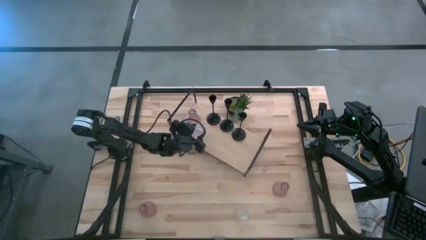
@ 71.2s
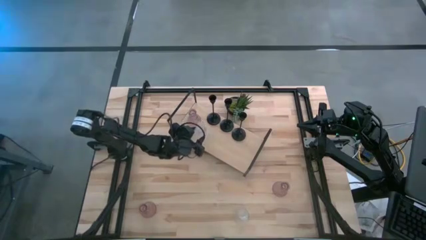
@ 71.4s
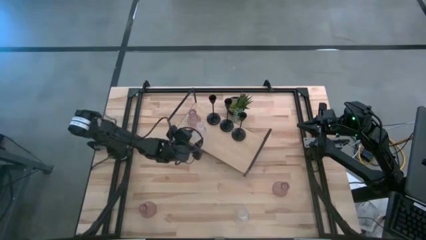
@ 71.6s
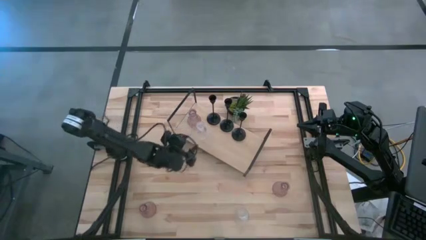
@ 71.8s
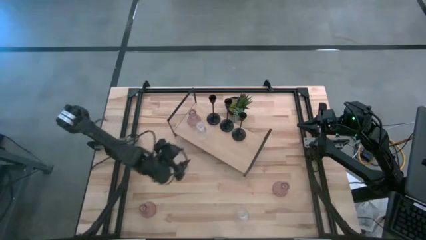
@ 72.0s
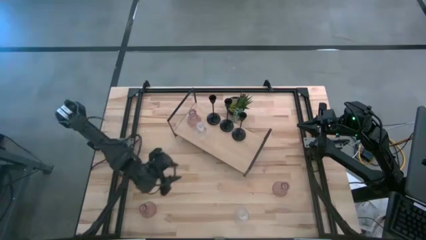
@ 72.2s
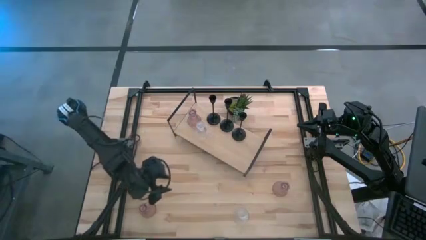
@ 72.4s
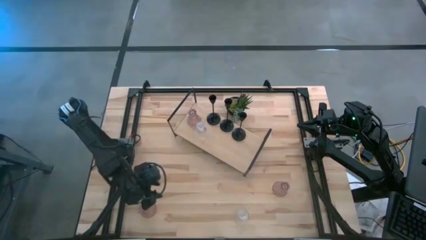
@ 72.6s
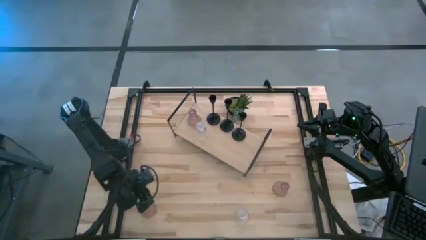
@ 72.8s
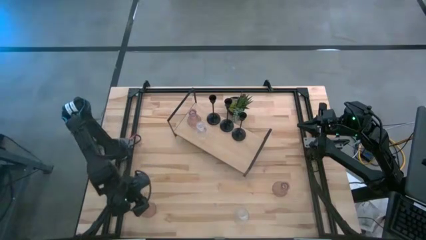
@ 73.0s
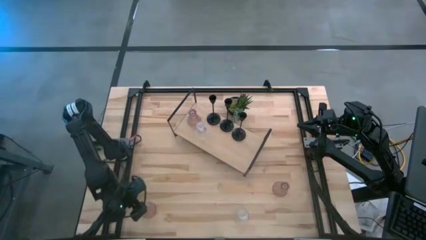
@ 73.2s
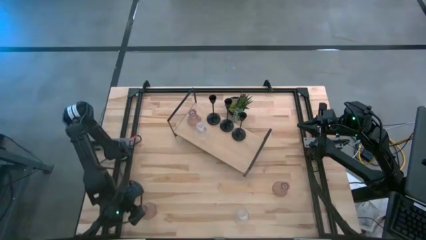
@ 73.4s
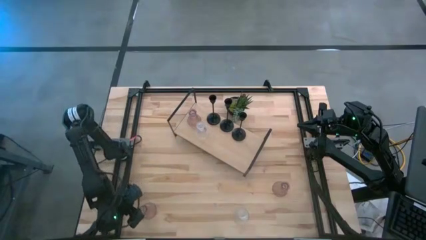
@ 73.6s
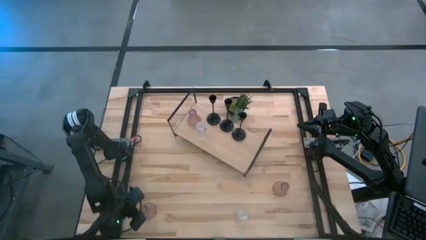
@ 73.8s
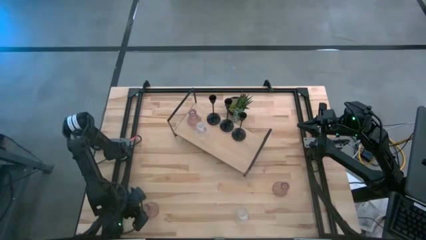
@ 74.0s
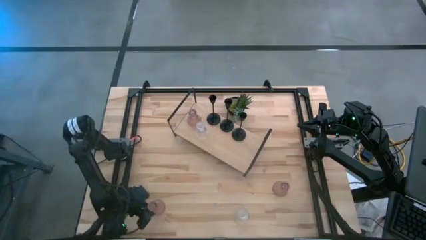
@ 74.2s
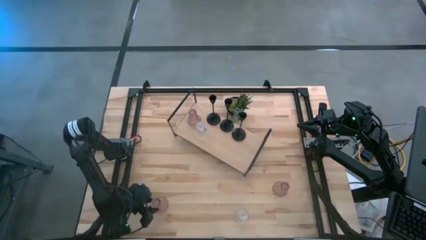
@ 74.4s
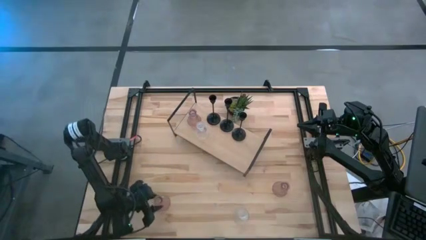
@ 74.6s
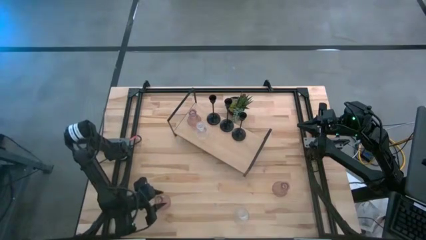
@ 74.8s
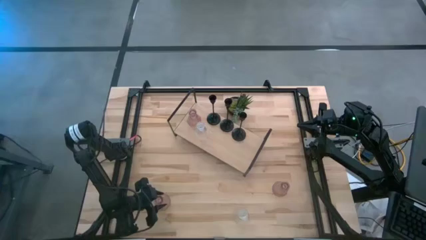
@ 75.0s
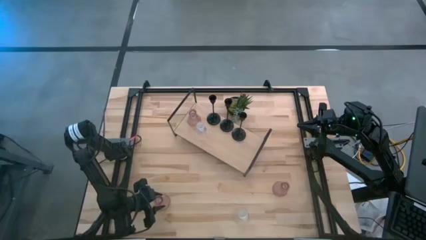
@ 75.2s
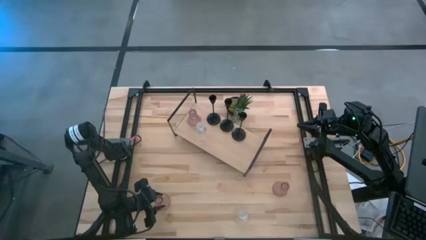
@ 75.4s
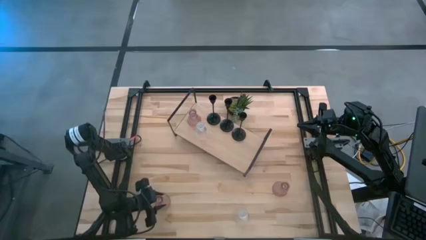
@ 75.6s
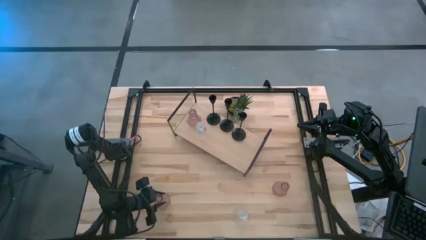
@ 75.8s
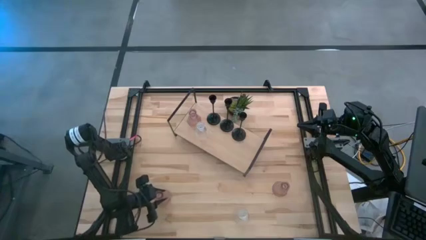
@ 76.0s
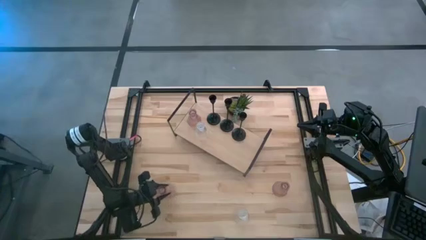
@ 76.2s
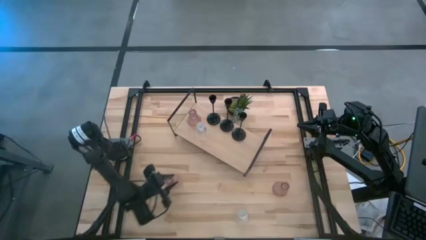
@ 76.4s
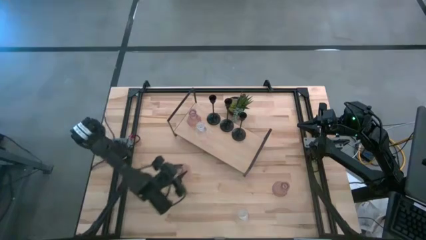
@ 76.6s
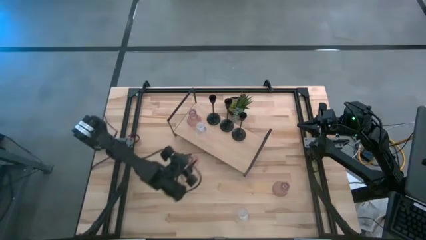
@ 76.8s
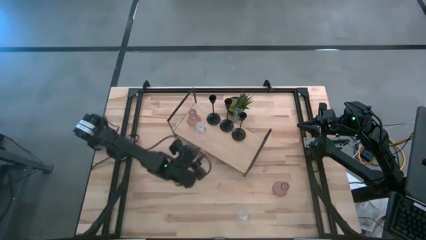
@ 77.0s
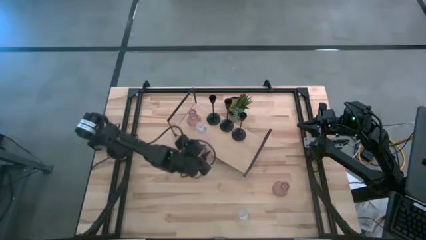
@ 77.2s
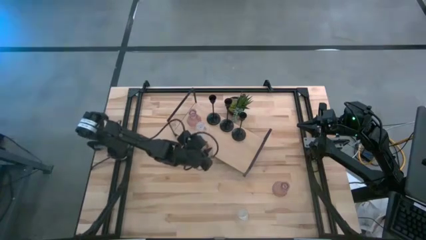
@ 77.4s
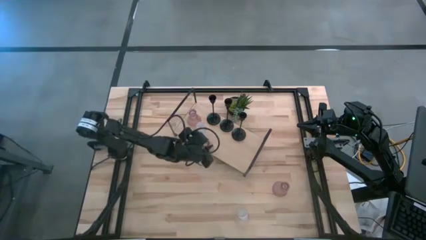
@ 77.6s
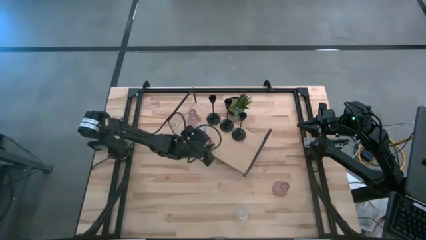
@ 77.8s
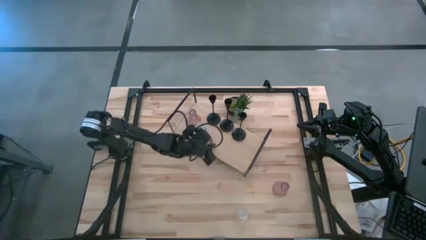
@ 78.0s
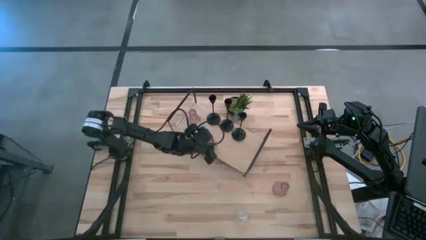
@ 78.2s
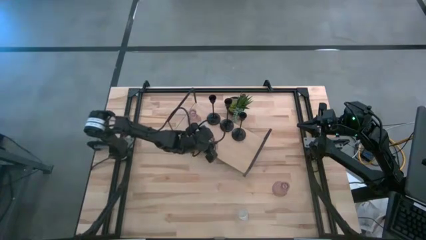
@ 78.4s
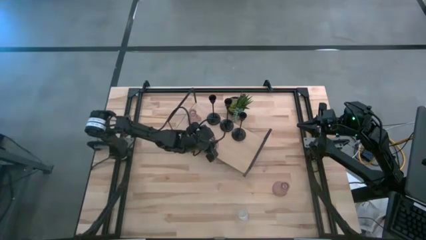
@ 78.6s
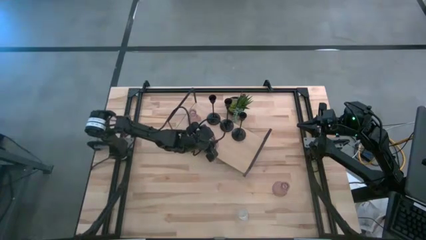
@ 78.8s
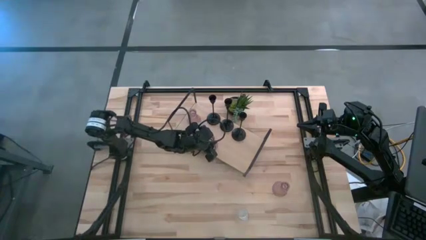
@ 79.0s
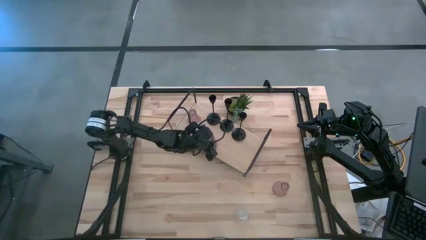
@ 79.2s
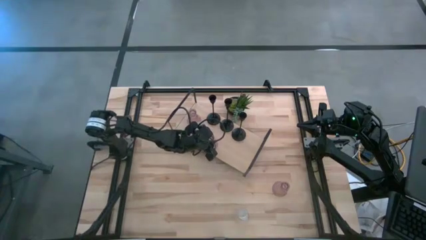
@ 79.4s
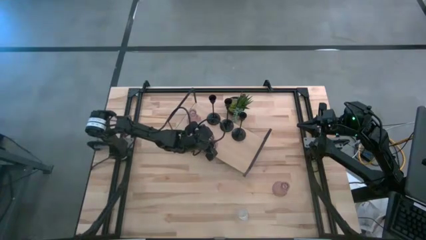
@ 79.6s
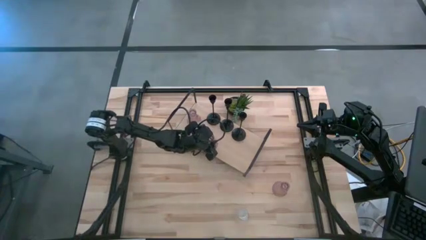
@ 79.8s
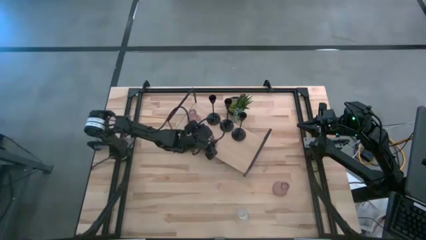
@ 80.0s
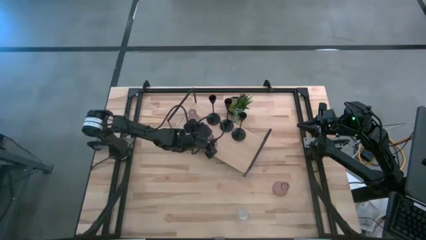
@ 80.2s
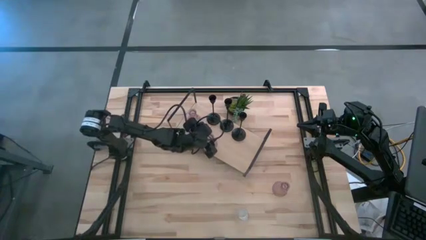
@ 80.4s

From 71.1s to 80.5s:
Task: Pick & Place candle stick holders
Put the left pink glass candle holder on the shelf

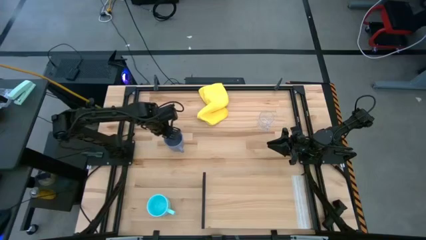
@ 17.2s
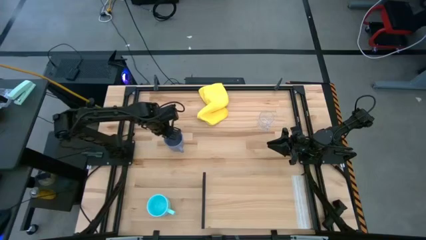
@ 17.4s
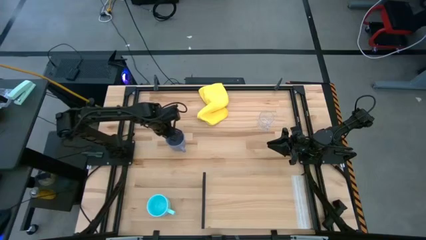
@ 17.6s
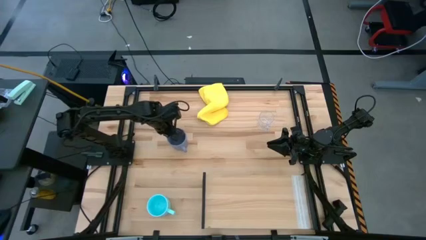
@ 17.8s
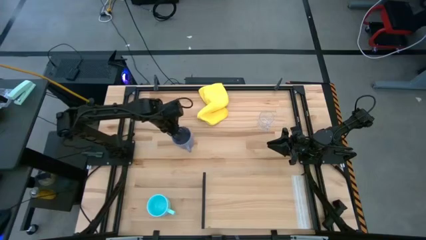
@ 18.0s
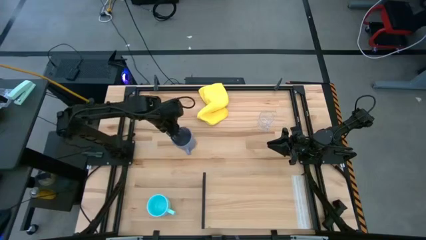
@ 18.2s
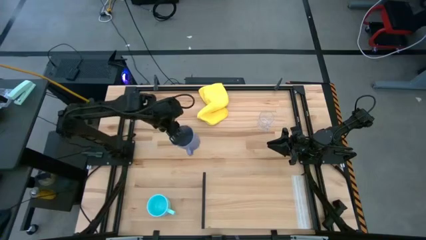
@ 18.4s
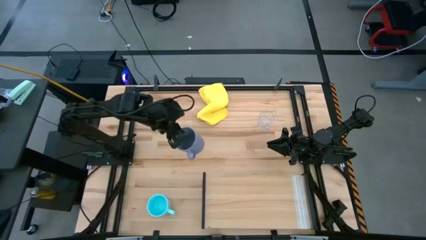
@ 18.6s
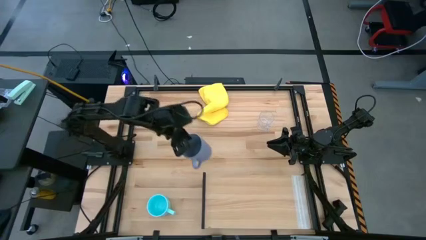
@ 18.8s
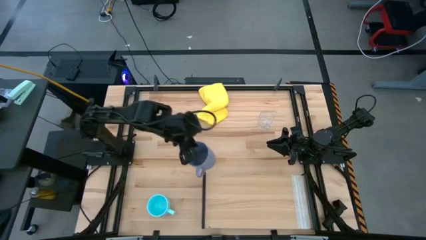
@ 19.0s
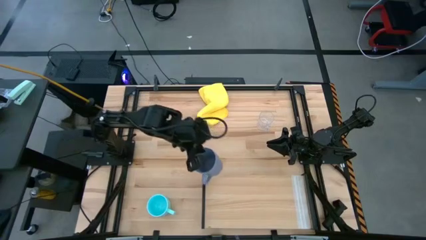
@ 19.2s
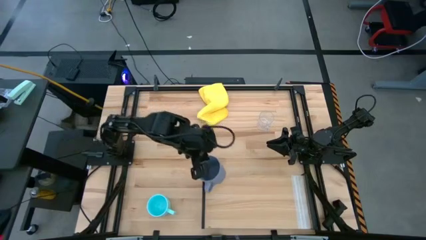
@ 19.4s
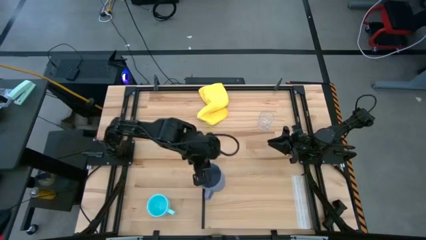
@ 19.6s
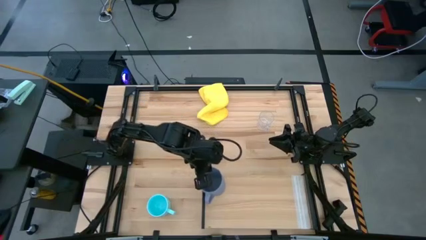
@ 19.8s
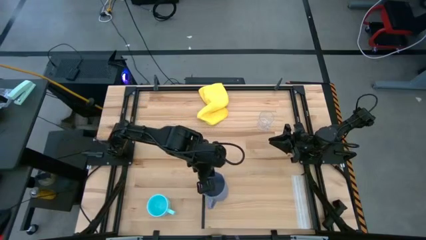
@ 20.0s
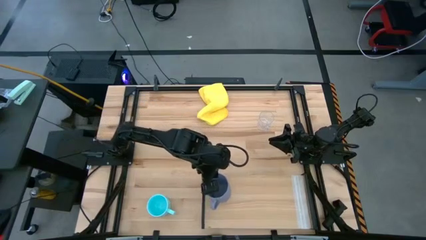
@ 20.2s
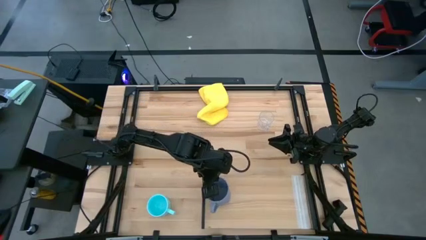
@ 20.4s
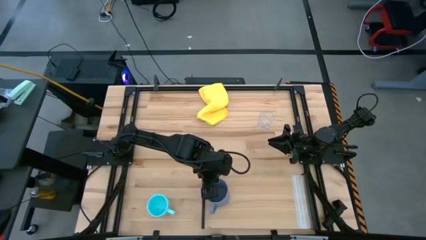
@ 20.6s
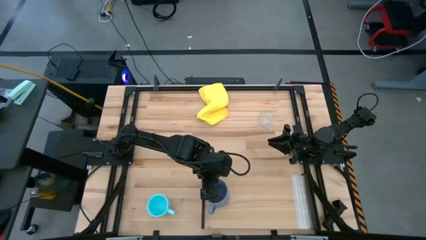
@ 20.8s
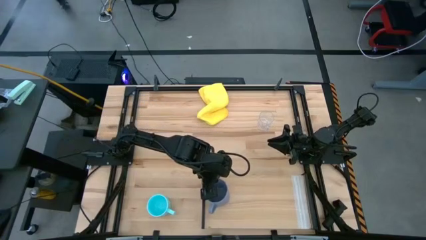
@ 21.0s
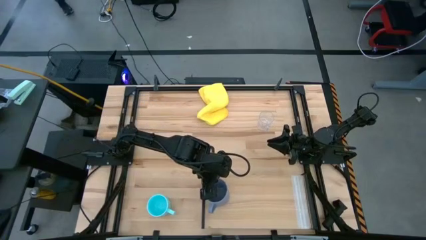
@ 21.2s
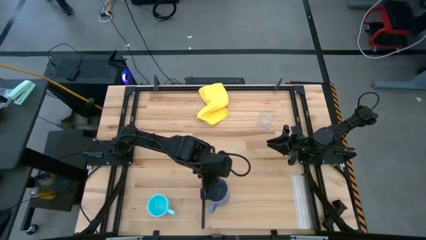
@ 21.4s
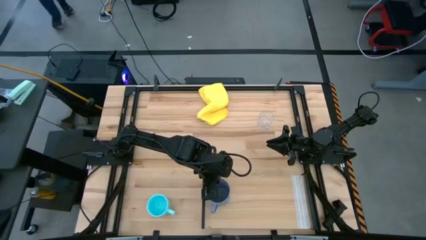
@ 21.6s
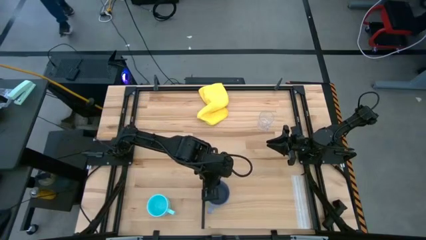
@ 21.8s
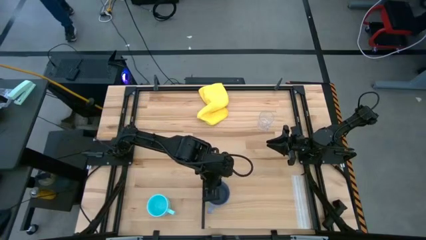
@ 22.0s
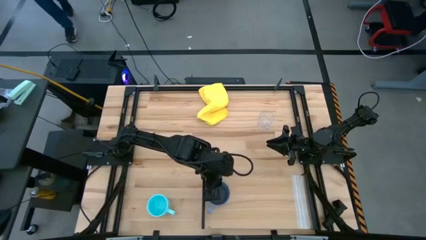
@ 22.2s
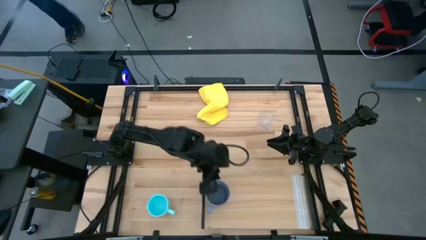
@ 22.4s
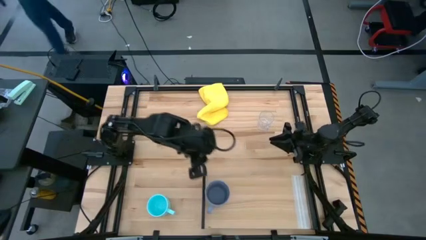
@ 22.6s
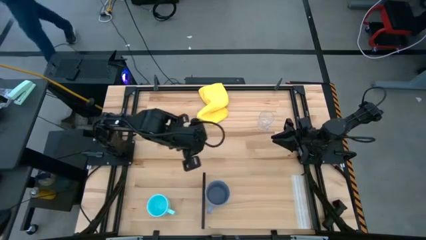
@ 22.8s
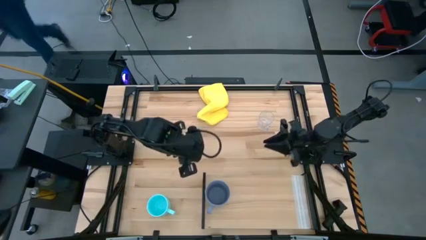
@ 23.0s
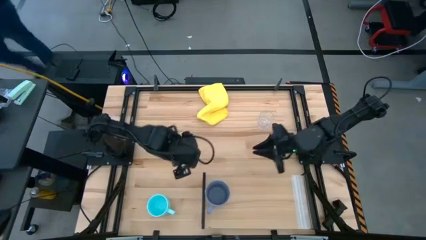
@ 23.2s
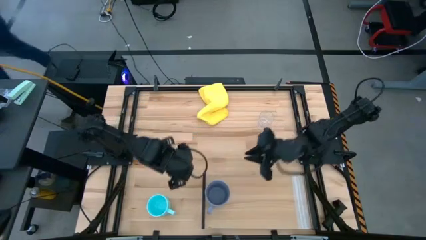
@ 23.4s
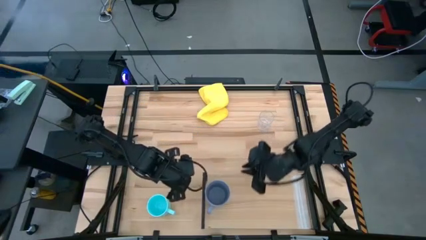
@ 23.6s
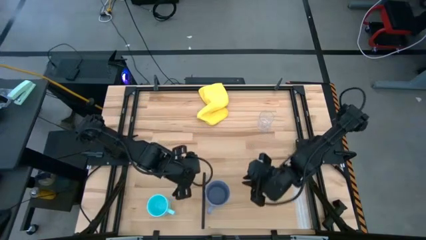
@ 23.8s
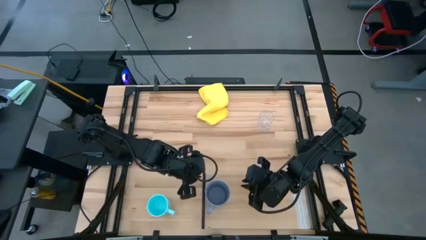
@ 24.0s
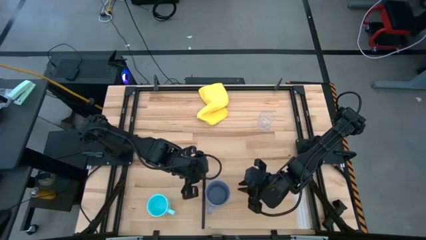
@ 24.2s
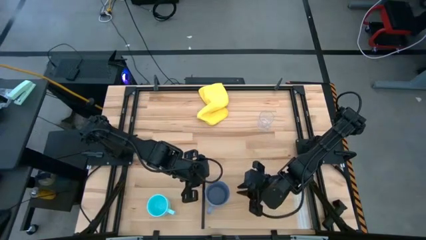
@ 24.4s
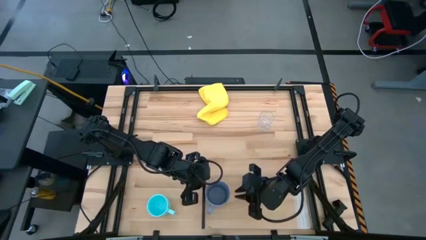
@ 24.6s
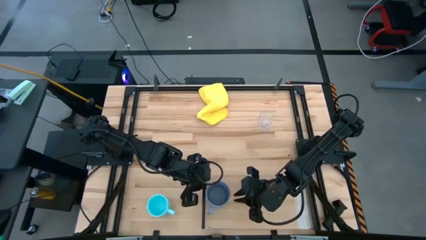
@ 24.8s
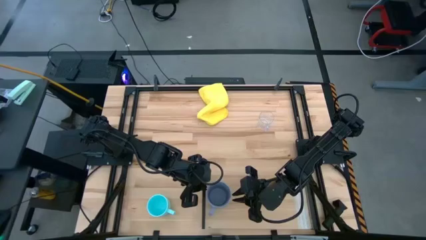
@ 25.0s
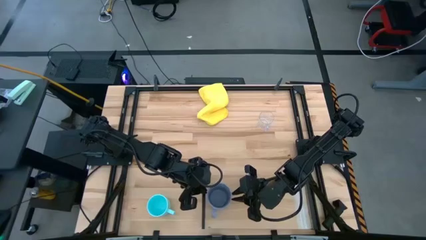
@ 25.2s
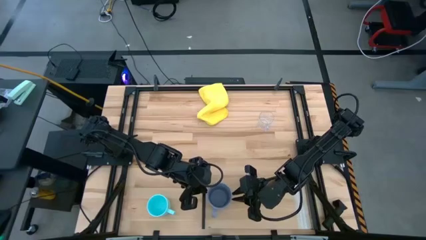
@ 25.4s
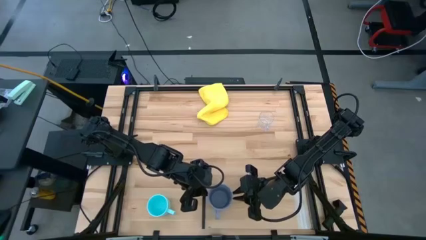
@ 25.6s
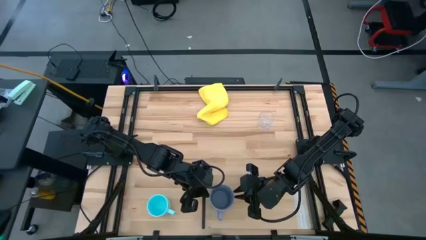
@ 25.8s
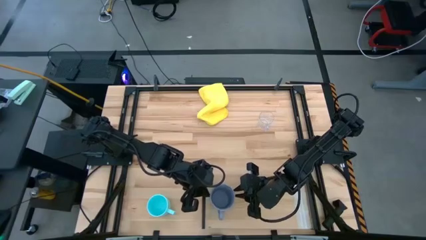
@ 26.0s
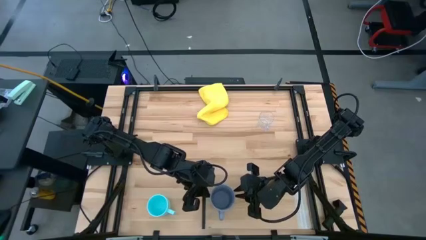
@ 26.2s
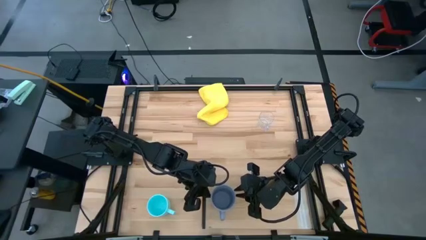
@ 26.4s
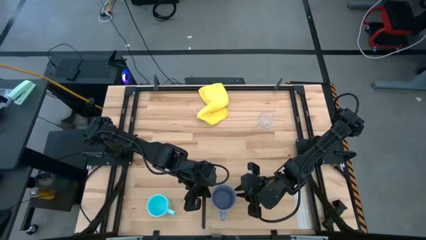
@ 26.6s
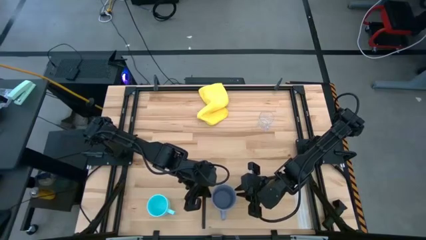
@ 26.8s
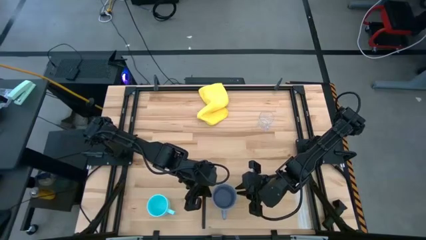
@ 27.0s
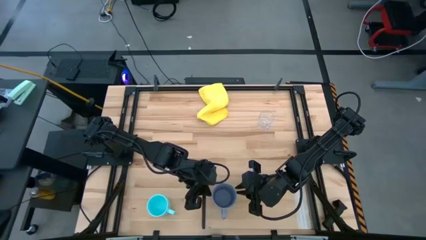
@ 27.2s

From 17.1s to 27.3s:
Task: Stack small to large cups/mugs on shelf
Put the blue mug on the shelf
